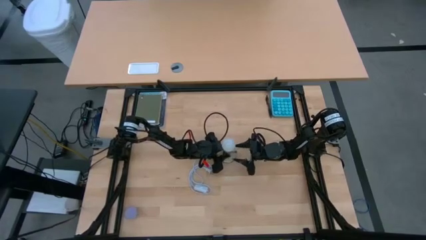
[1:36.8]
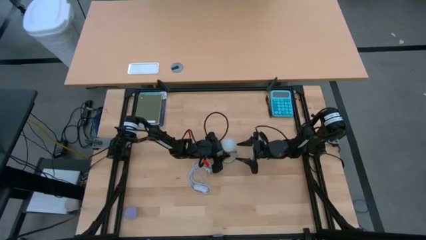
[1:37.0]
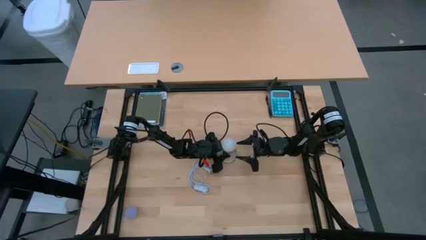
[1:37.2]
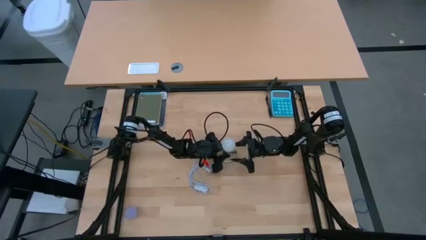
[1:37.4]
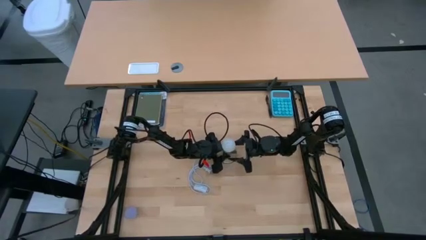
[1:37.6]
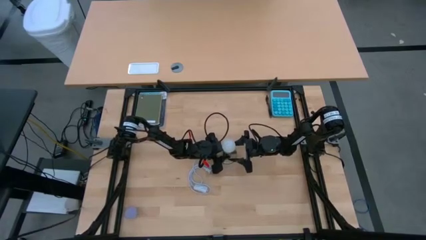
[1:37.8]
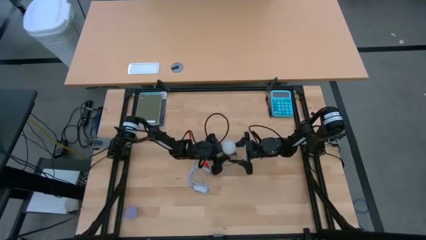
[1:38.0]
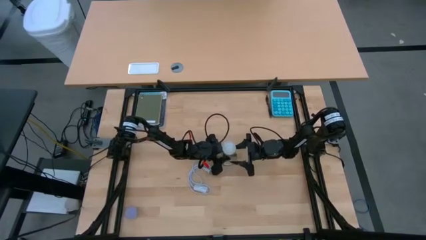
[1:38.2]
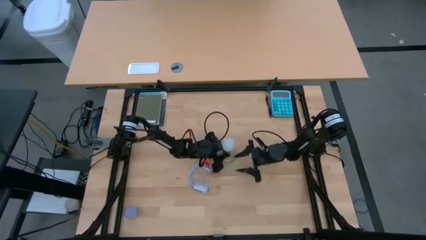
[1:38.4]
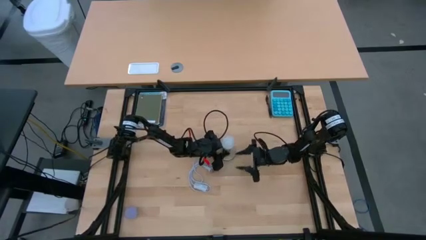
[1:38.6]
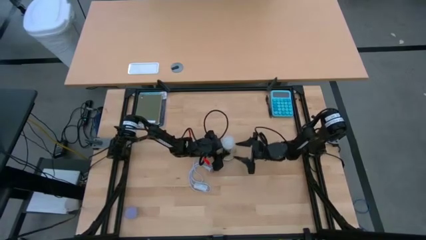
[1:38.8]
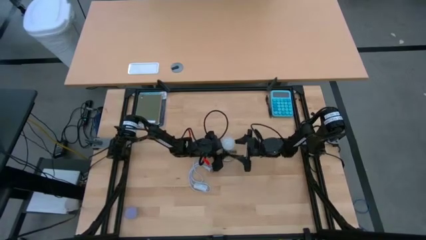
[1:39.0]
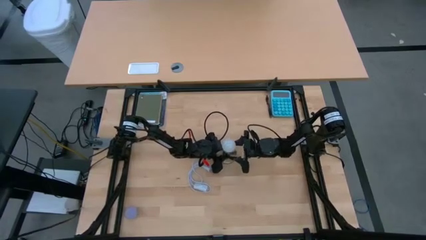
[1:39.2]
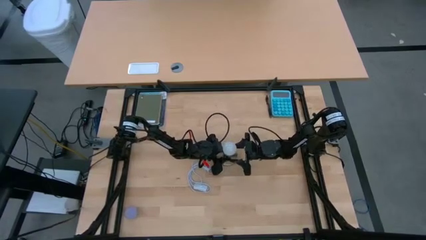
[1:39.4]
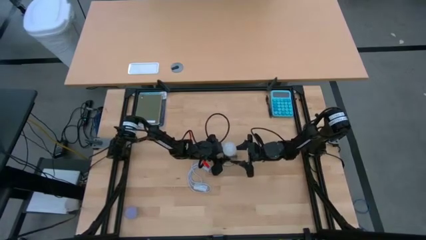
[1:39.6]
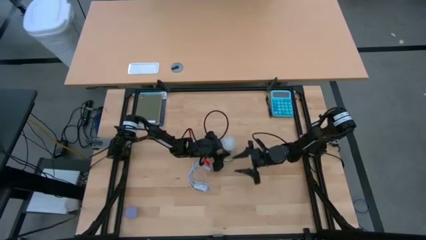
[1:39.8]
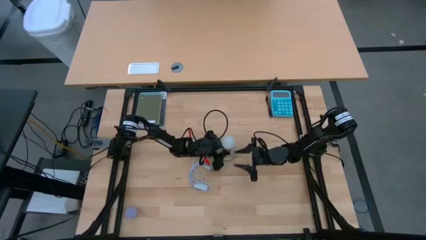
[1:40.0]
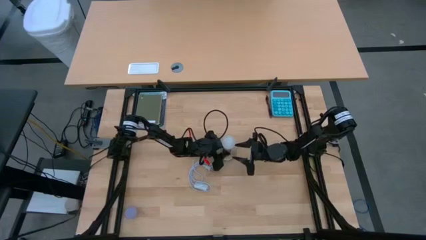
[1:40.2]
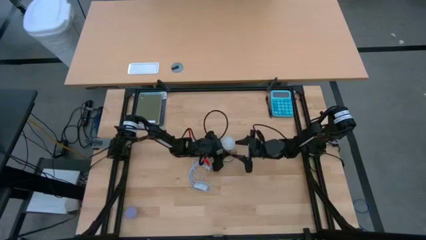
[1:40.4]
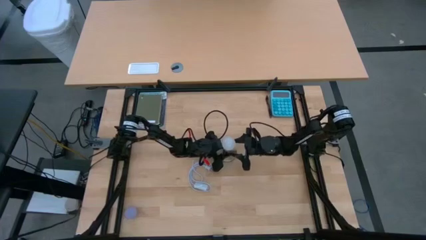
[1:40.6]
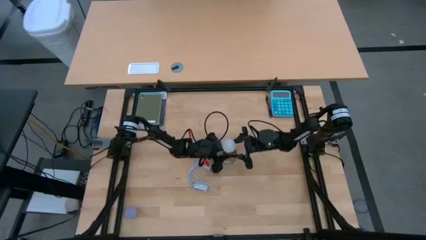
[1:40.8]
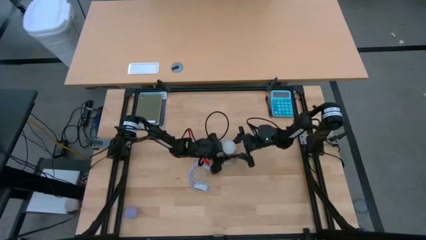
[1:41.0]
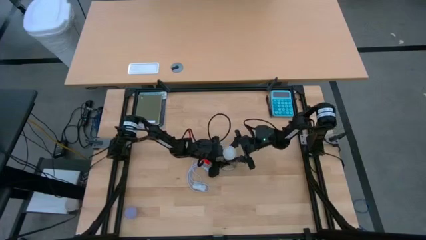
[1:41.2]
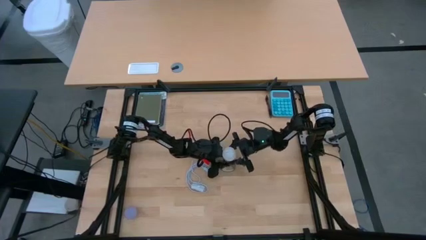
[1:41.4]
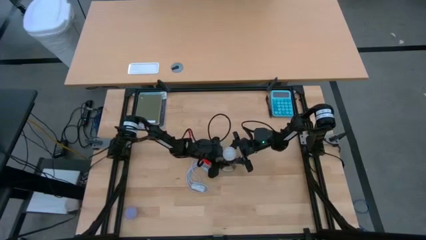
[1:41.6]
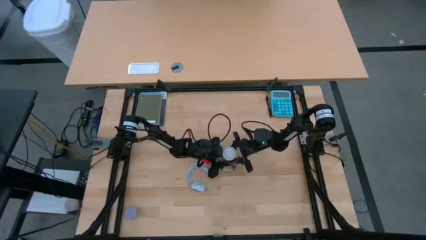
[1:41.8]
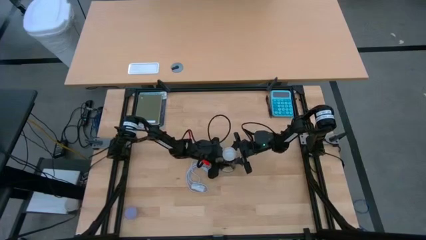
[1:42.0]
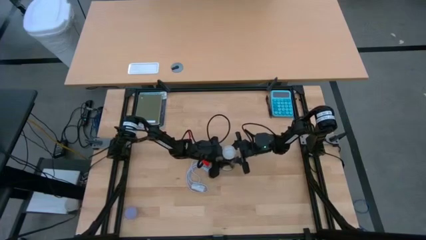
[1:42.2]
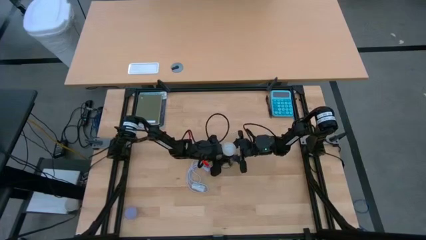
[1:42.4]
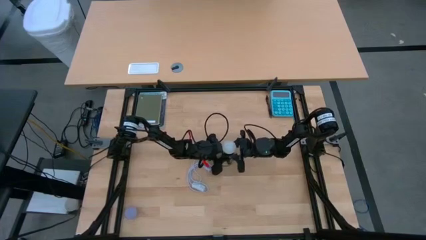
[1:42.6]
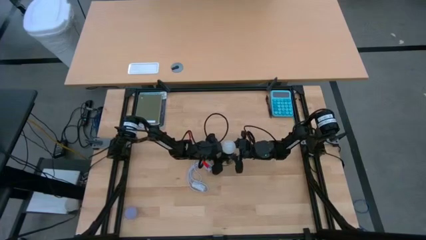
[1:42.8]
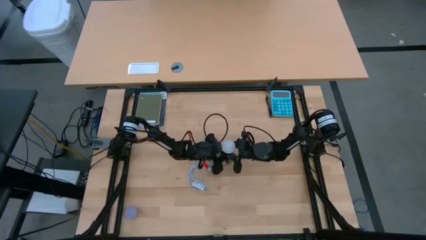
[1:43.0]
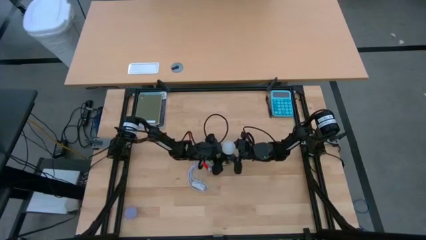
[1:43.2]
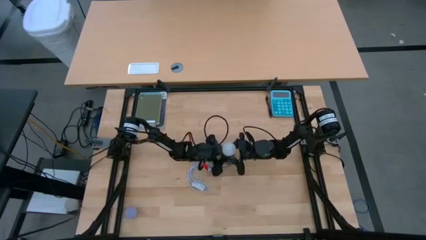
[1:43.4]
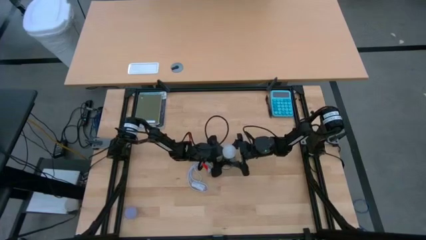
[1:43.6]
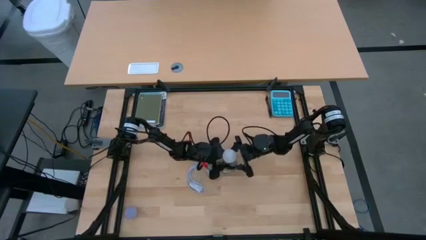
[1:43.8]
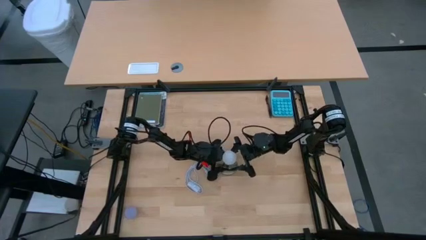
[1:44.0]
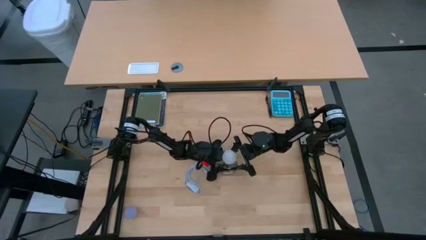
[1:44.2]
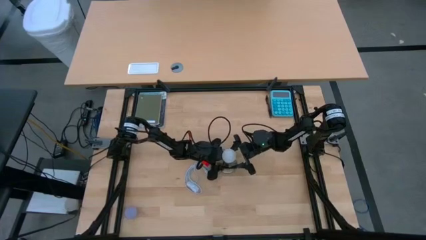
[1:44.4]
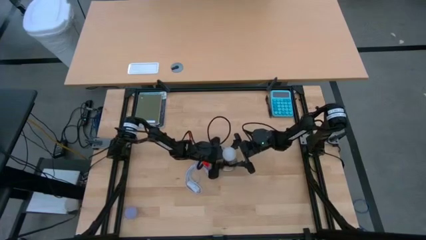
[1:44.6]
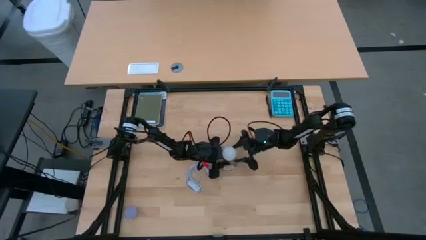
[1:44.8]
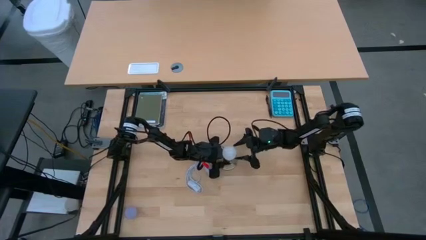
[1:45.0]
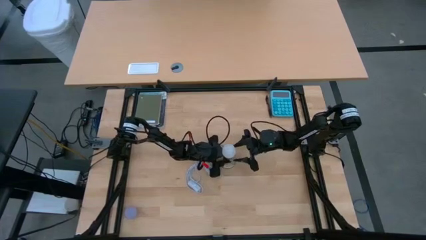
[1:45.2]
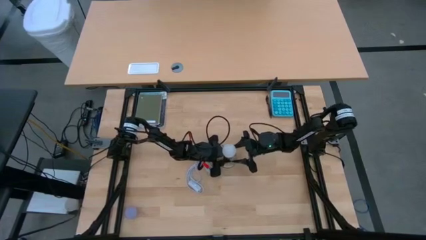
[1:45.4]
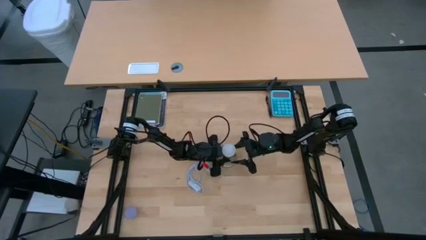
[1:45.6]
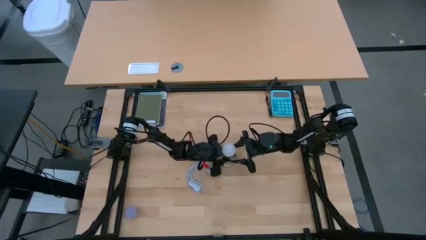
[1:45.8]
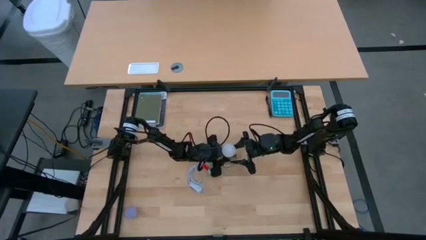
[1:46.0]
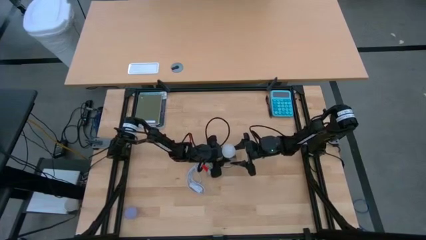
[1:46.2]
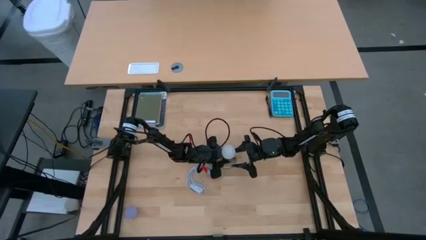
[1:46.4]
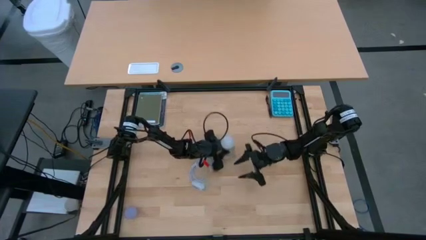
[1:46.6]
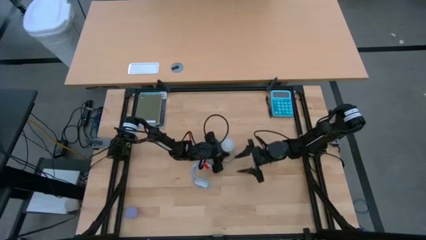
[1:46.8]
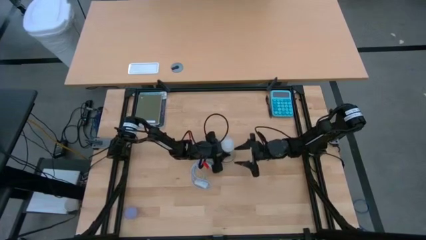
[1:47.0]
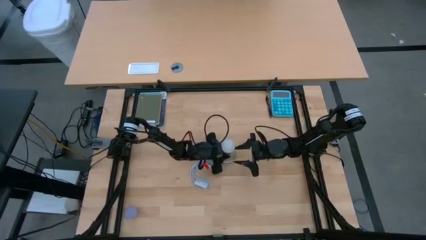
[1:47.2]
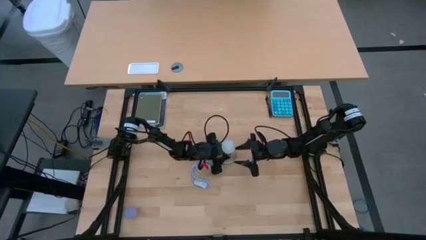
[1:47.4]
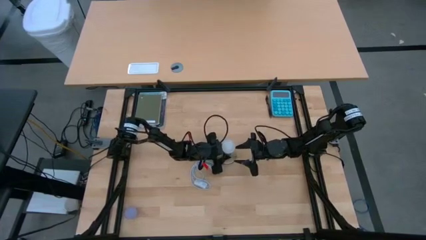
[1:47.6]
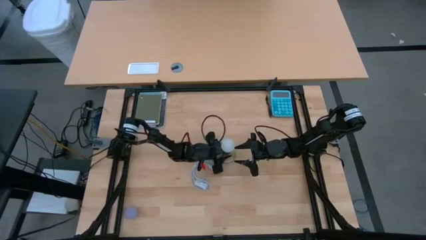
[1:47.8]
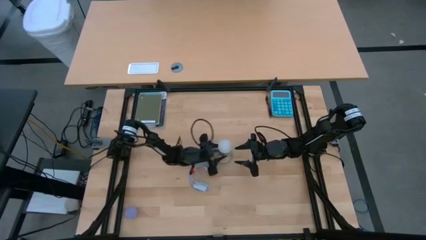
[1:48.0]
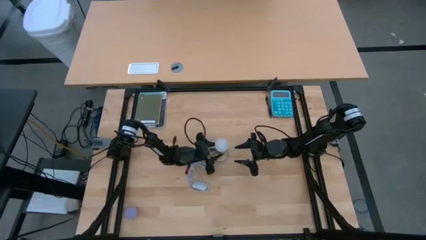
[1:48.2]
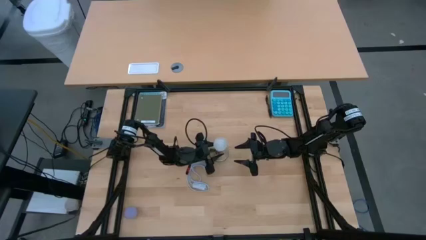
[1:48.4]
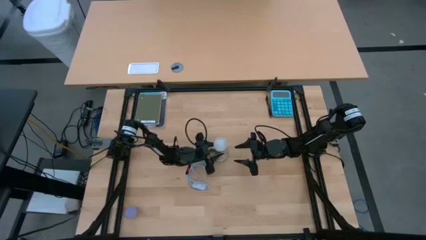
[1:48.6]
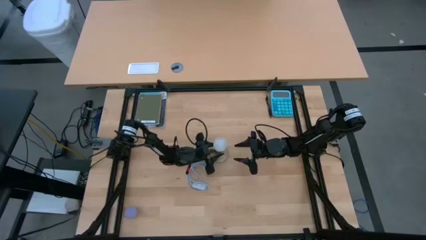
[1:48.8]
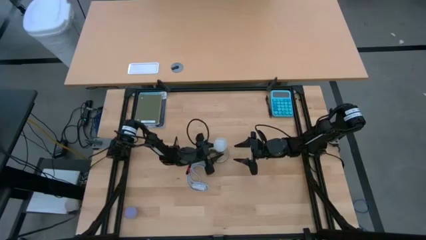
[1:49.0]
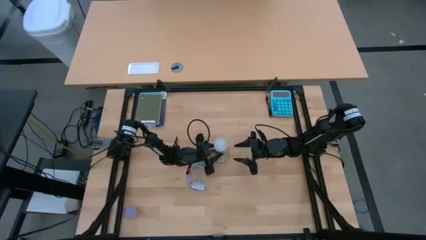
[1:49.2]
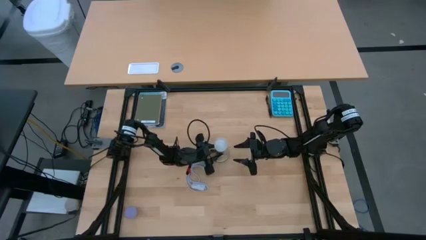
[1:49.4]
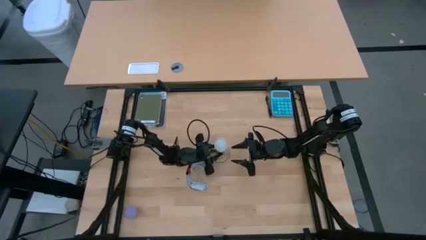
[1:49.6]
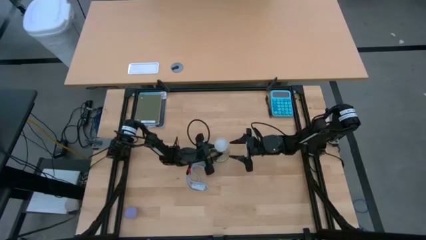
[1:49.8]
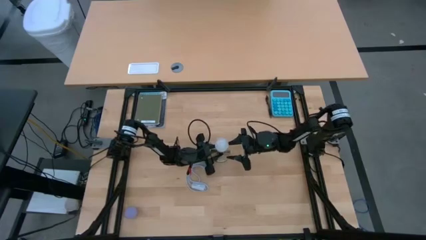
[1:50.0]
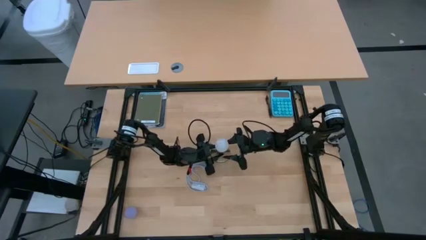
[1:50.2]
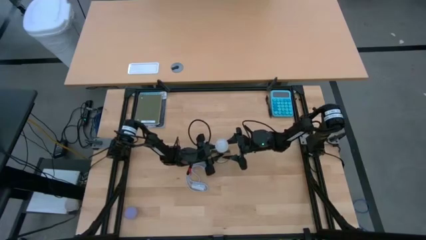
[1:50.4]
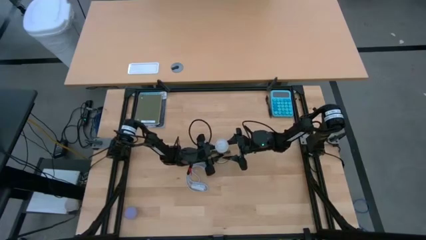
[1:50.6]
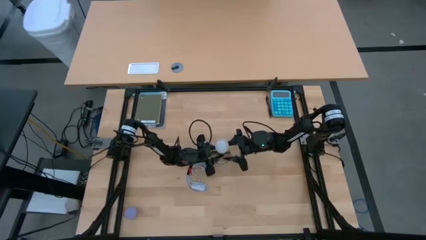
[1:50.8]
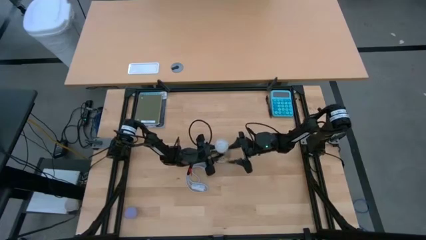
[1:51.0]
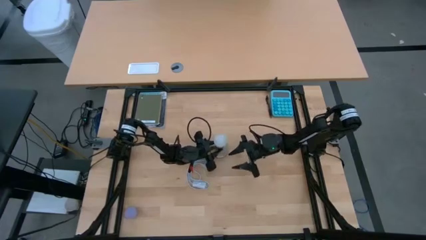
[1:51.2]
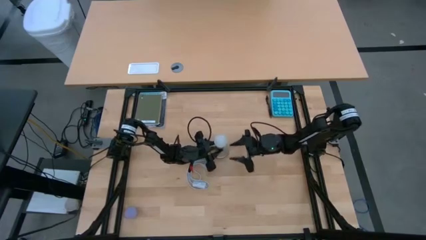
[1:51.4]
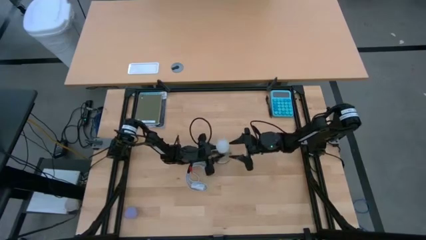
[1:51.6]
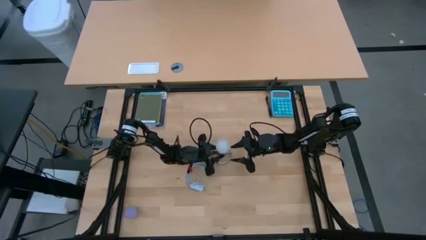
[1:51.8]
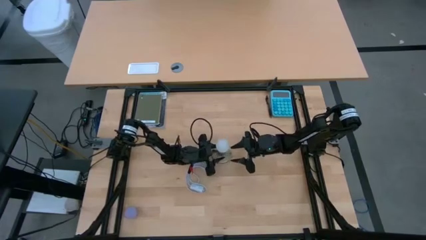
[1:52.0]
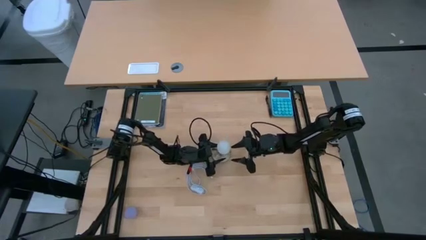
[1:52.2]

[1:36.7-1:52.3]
Task: Screw lightbulb
Insert the white lightbulb into the silver lamp

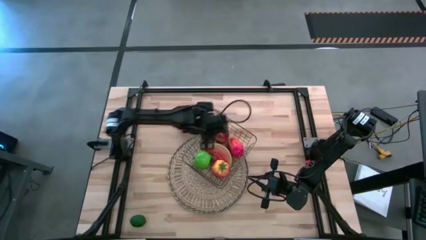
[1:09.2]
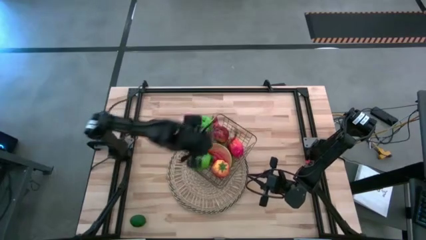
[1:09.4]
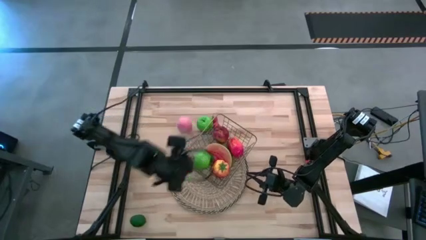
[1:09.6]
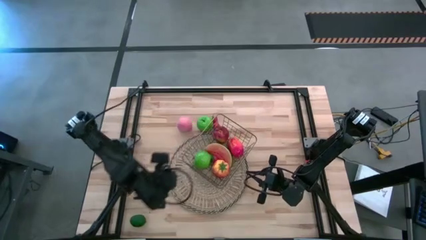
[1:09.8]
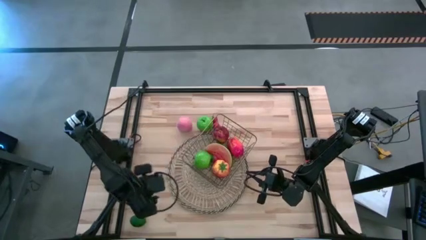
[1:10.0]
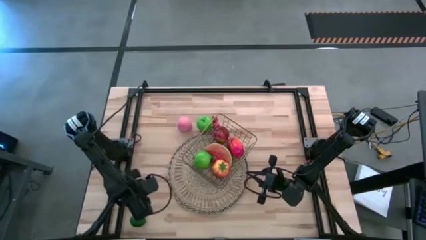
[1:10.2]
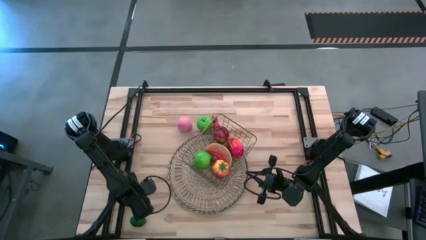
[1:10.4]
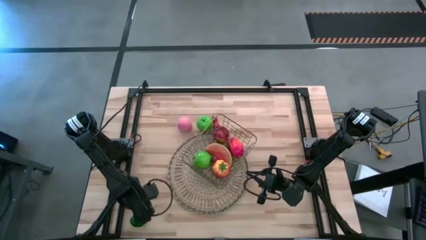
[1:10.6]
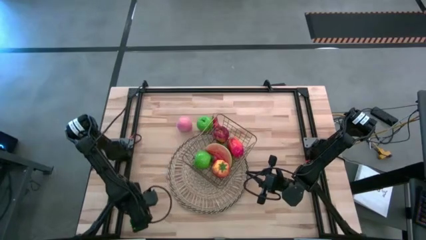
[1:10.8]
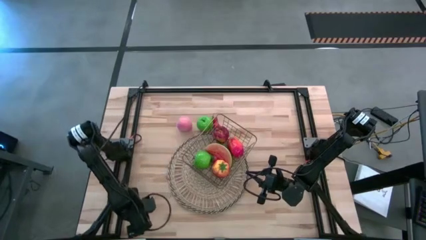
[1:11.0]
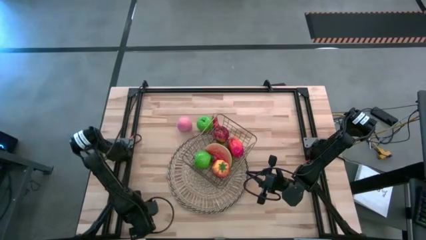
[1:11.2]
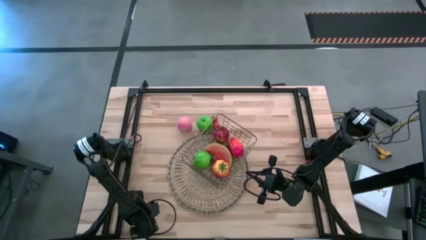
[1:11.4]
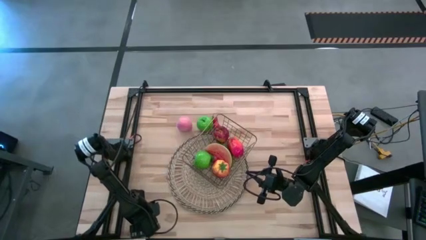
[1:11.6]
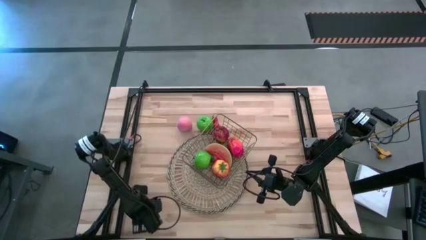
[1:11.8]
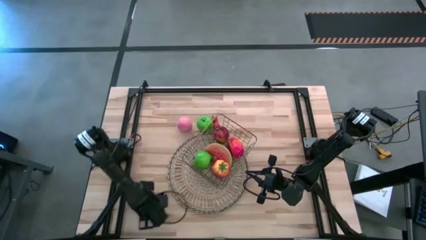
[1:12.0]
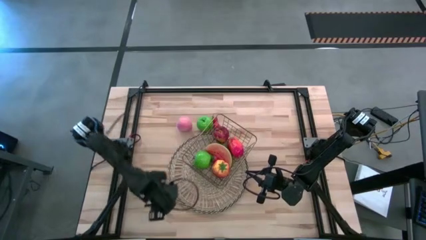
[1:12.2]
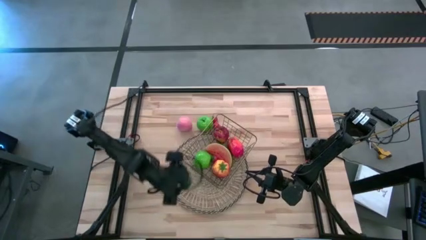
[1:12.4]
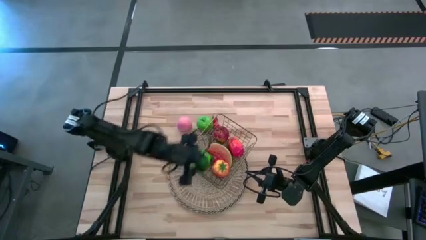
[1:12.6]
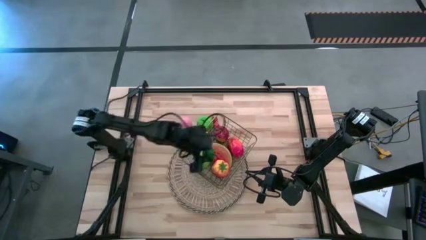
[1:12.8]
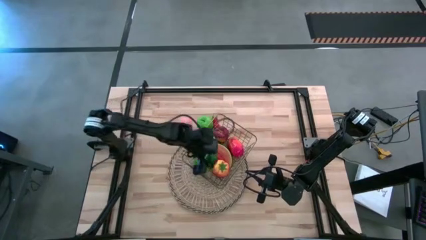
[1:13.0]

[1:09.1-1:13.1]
Task: Build produce basket
Put the lime into the gold wire basket
